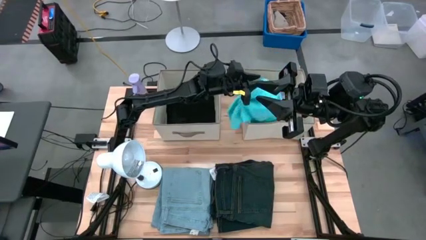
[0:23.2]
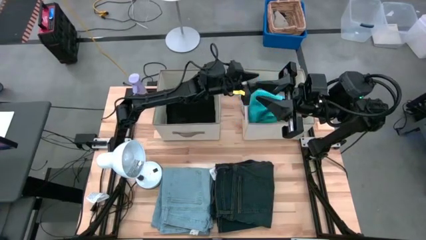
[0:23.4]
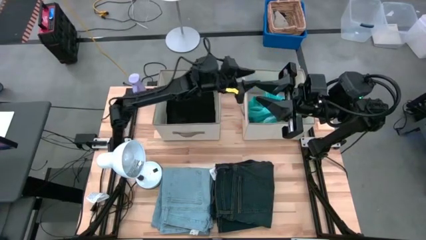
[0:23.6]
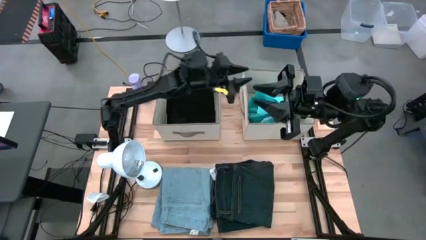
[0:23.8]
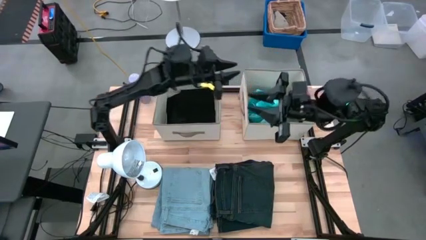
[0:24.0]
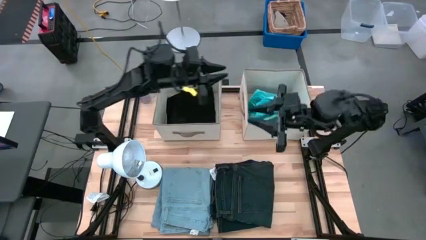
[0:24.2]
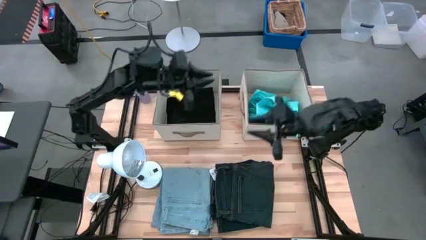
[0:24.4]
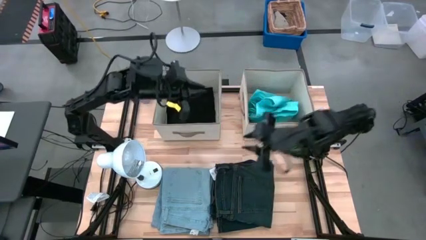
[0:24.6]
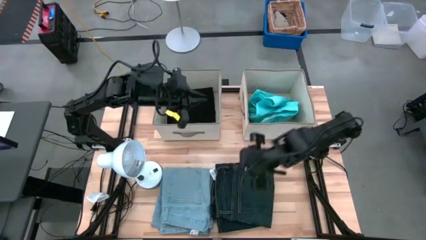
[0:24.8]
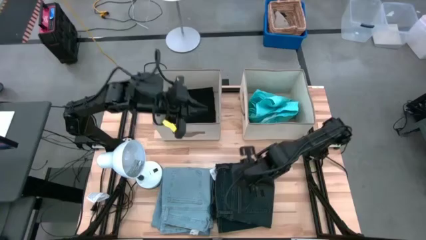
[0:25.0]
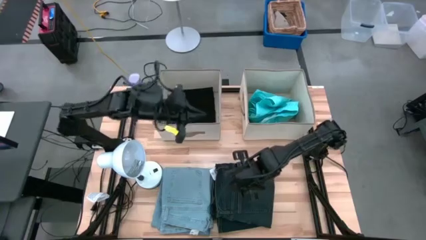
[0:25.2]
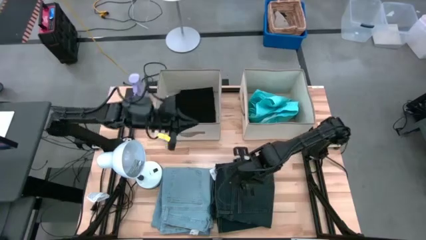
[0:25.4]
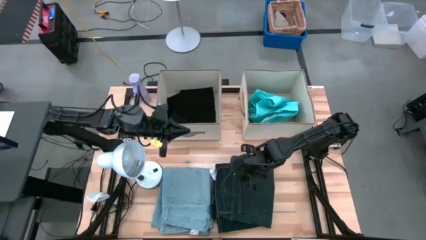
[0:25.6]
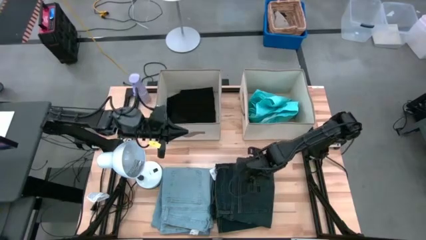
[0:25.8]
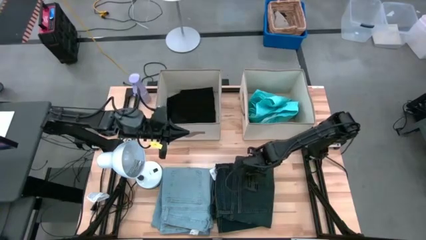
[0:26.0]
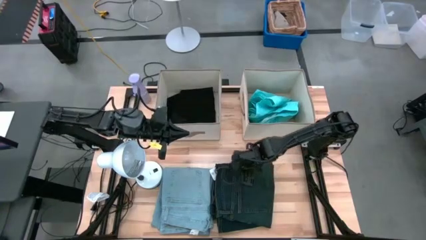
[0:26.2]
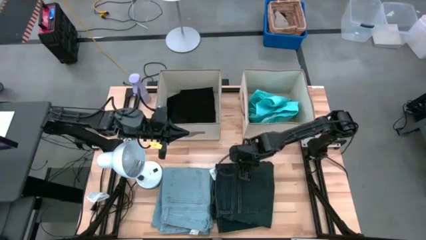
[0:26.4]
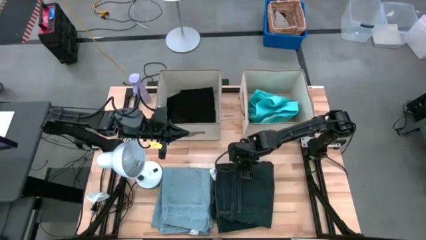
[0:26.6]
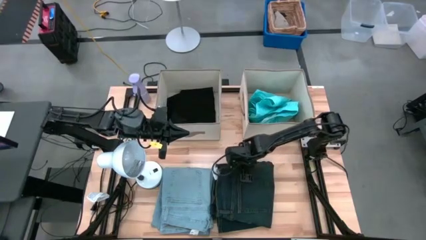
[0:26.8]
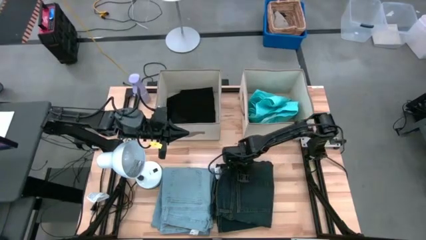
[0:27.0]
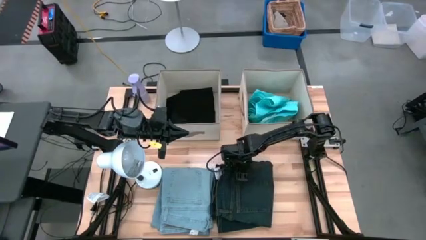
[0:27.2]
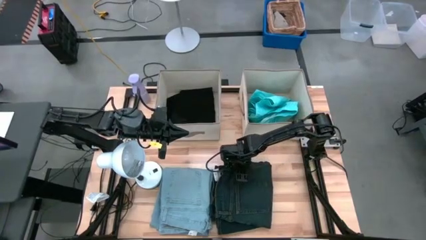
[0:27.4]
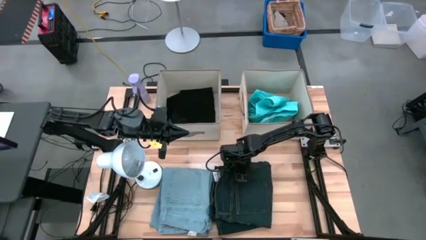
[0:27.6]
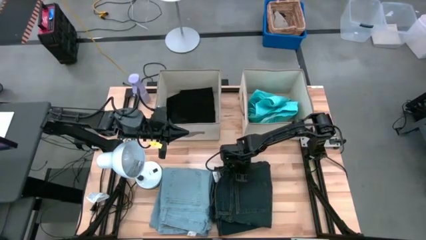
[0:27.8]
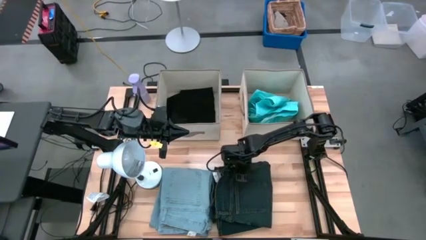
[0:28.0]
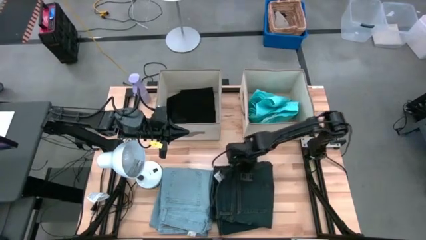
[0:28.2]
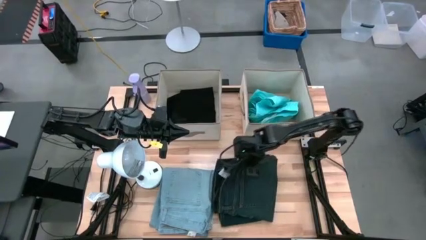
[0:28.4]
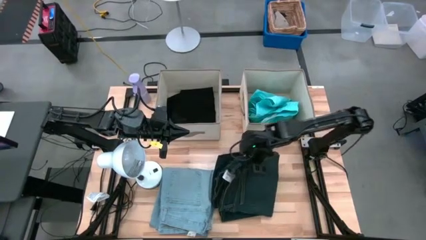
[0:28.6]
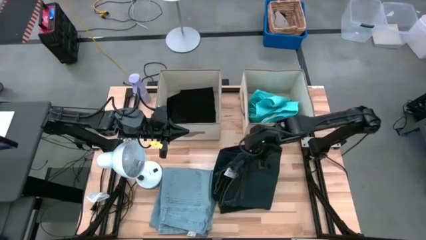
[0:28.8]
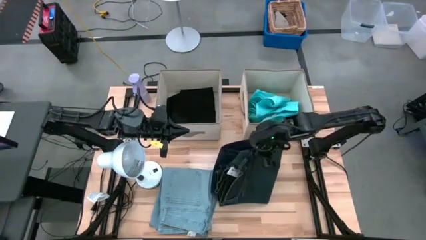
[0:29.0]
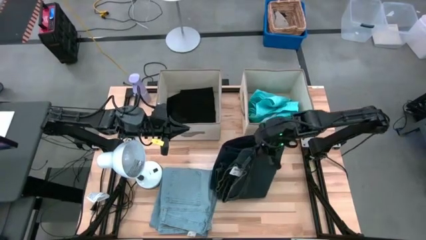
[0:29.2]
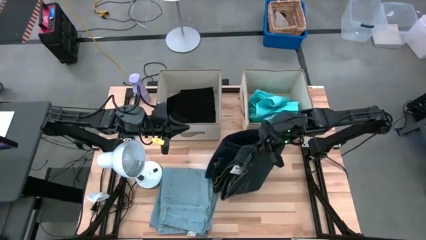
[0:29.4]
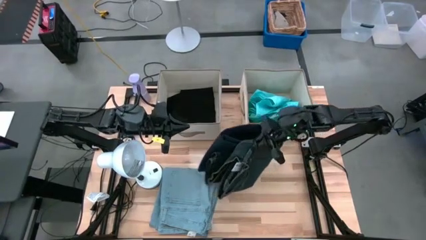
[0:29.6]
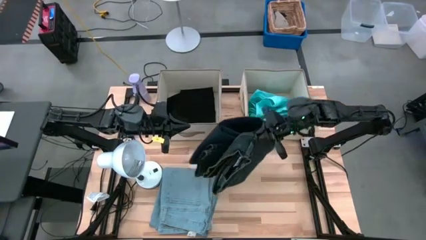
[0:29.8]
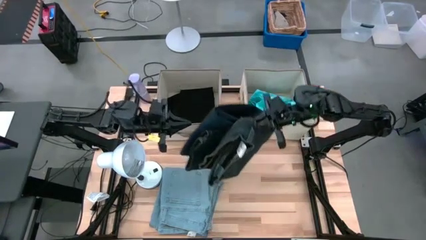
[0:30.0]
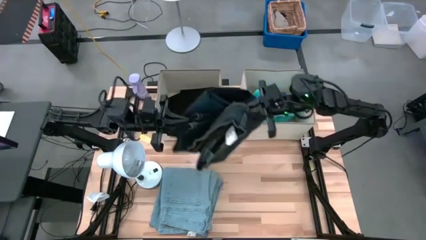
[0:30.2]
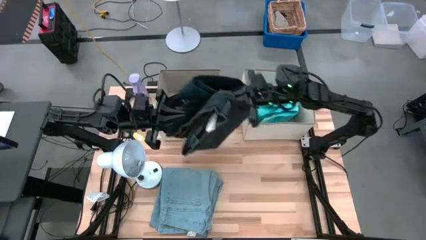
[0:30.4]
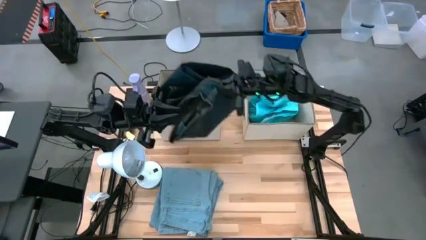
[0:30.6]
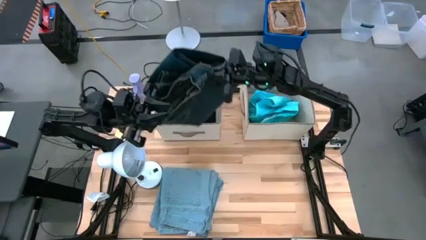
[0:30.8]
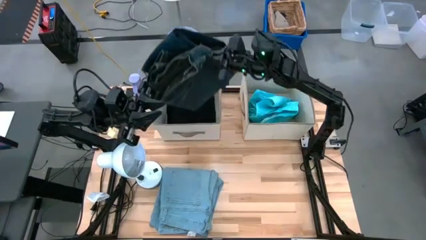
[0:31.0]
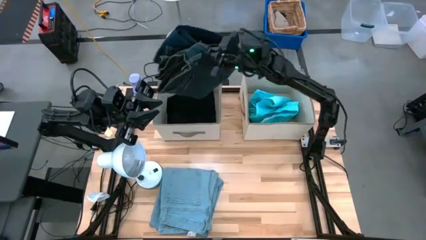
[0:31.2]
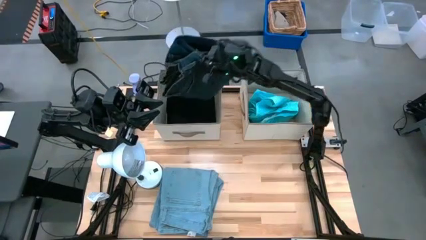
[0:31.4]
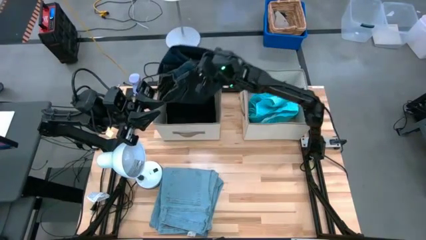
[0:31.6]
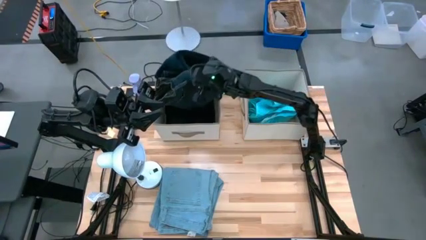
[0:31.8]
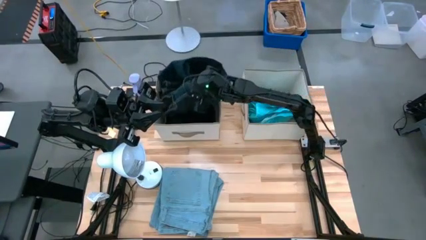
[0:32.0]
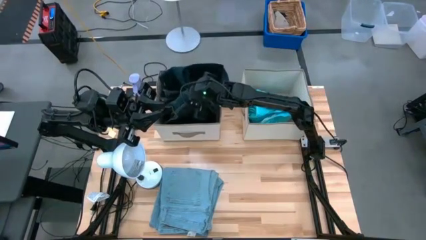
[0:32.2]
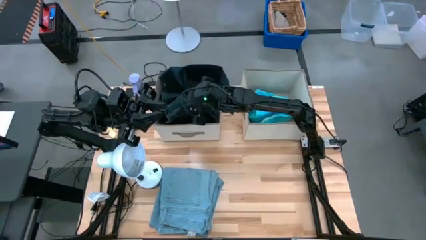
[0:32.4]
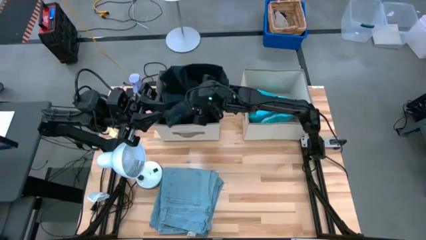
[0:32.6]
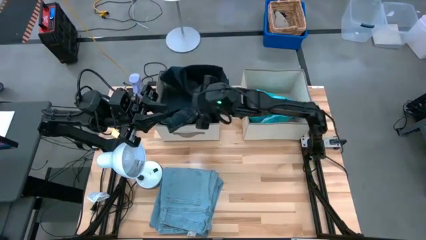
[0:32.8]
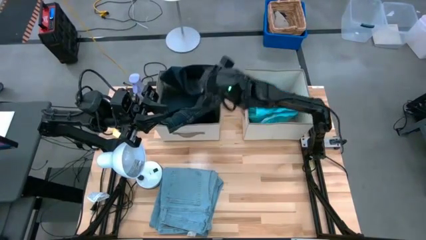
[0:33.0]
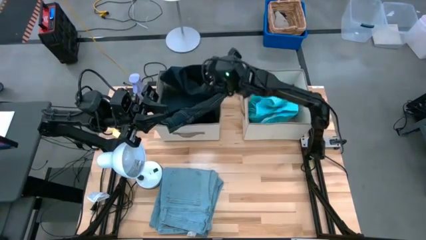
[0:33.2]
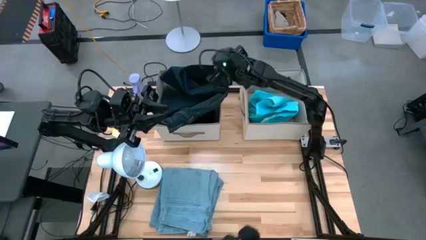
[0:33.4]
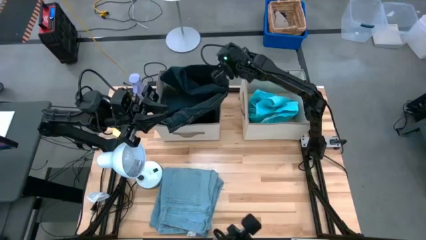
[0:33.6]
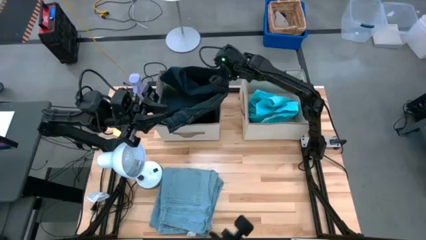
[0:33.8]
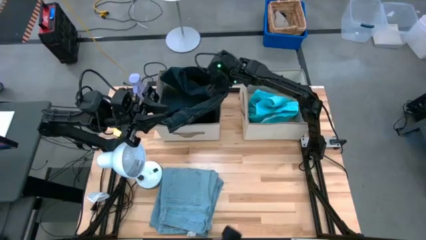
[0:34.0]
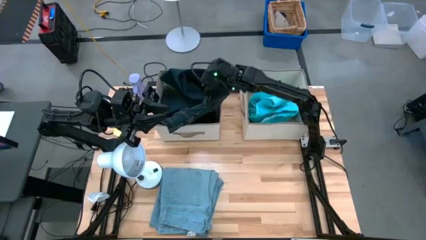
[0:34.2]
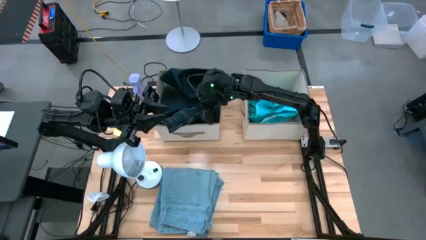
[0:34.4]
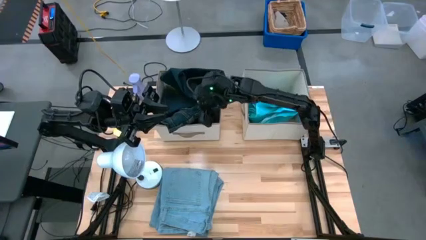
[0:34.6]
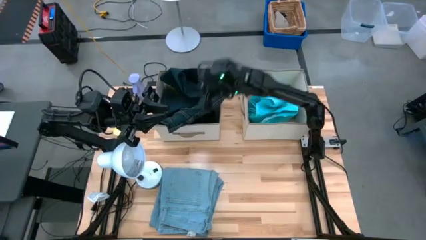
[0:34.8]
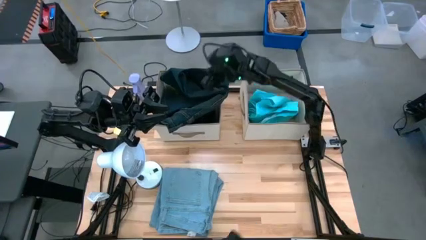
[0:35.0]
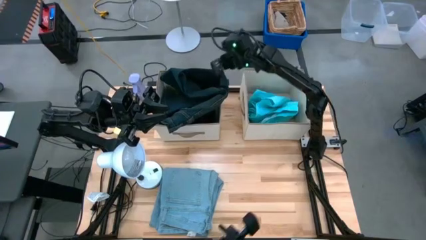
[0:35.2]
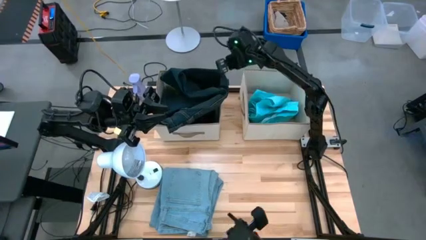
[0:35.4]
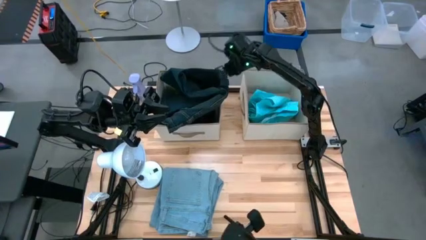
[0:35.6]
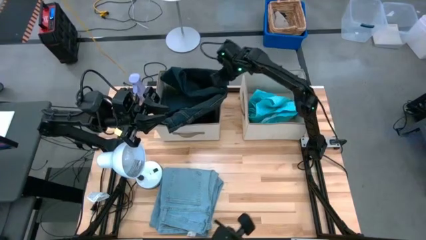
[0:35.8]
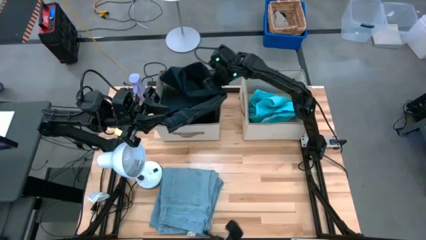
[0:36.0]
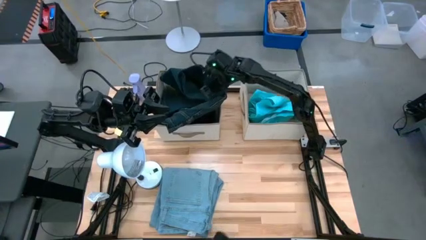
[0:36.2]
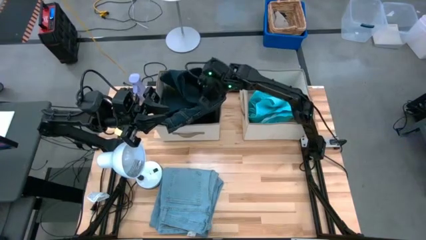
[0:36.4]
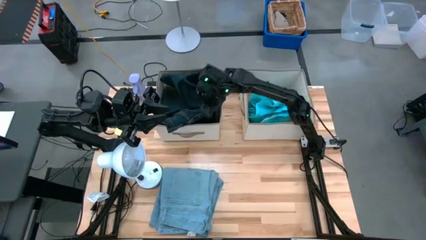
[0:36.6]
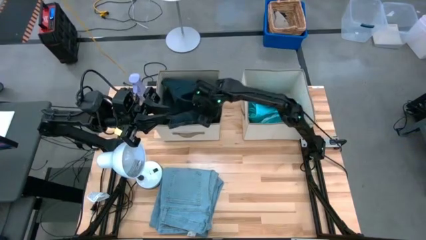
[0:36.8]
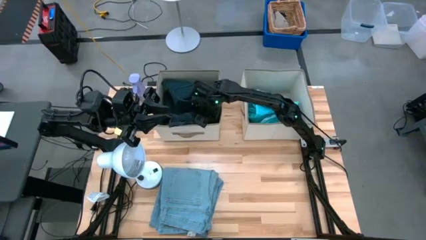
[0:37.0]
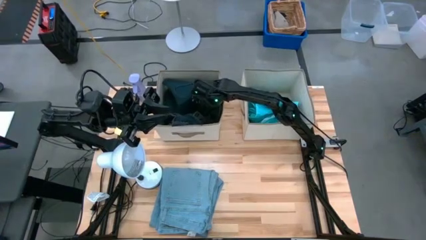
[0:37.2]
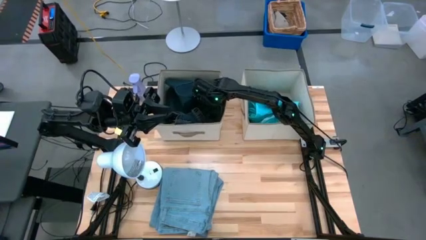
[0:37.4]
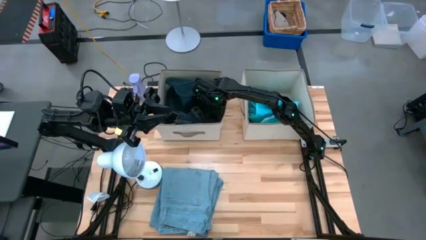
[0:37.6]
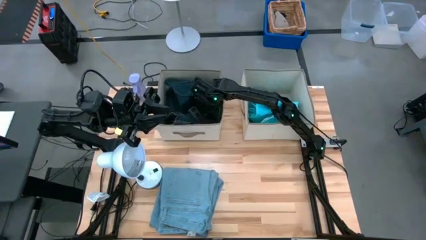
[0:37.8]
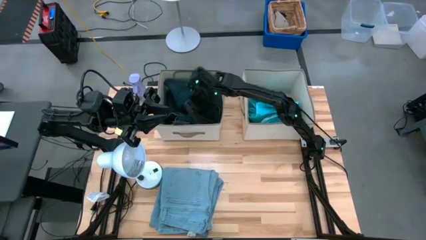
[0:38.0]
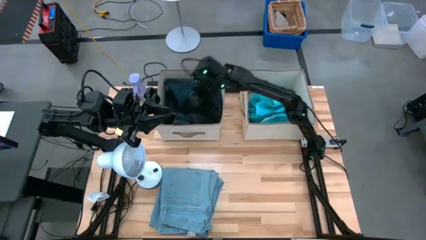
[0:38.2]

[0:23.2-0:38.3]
Task: Sort clothes
Put the dark blue jeans into the left laundry organizer
